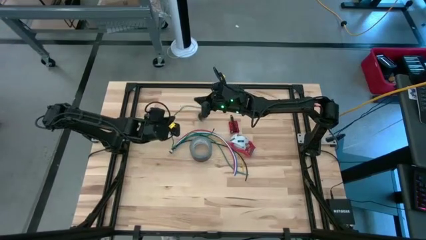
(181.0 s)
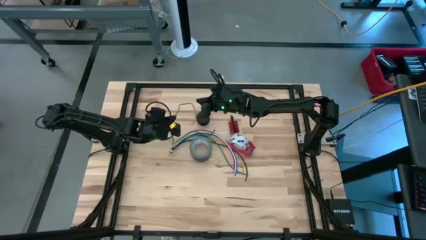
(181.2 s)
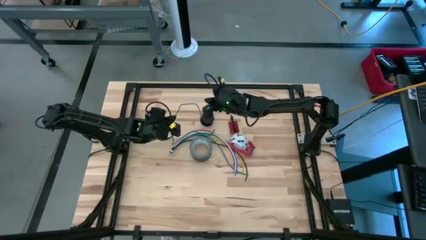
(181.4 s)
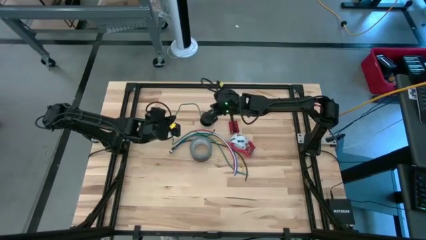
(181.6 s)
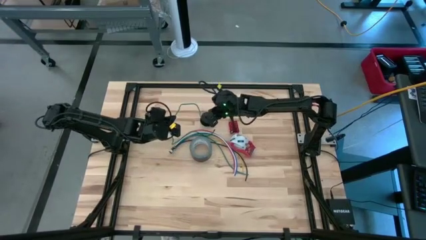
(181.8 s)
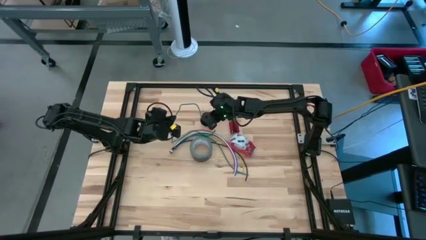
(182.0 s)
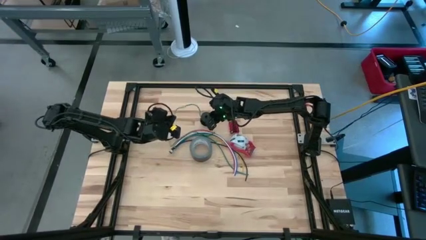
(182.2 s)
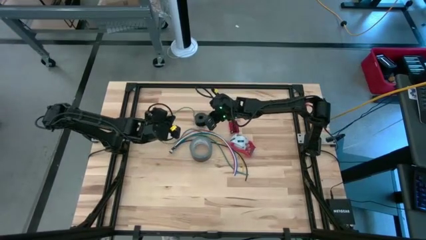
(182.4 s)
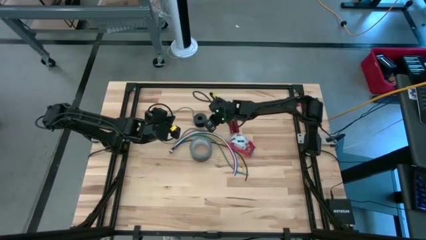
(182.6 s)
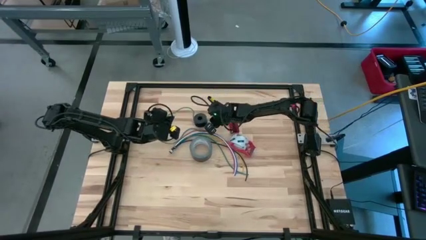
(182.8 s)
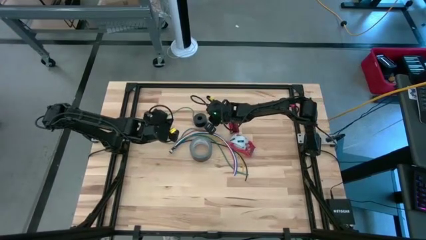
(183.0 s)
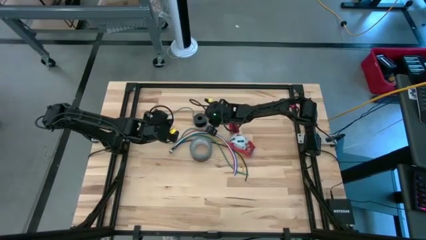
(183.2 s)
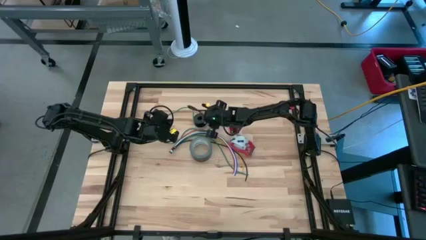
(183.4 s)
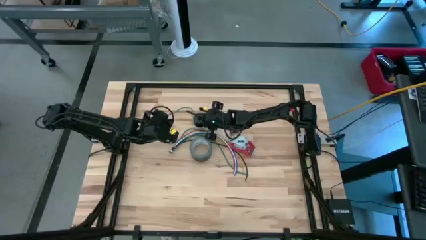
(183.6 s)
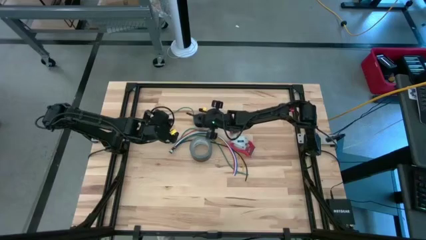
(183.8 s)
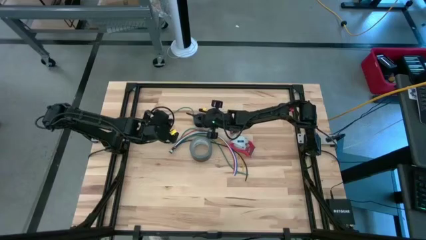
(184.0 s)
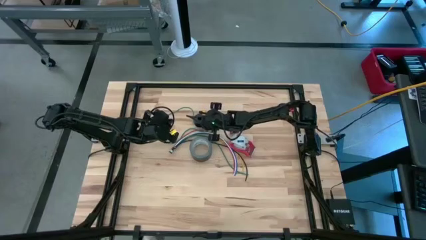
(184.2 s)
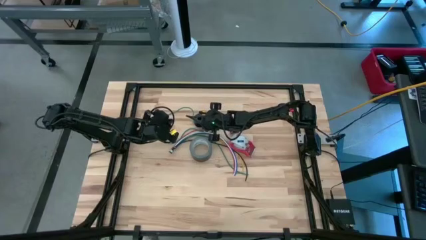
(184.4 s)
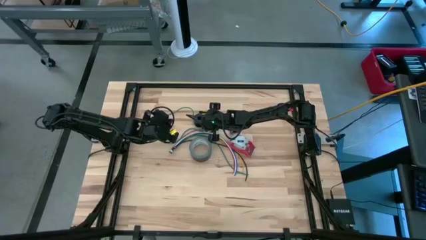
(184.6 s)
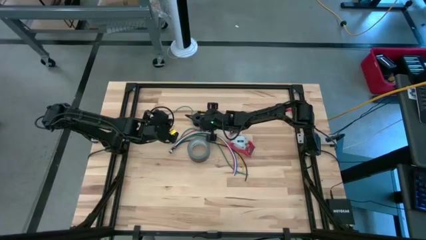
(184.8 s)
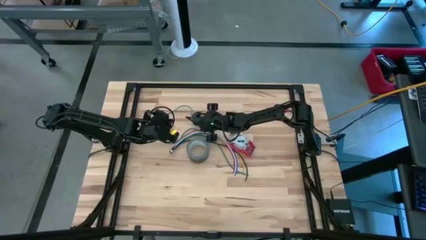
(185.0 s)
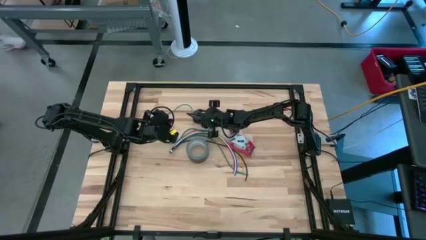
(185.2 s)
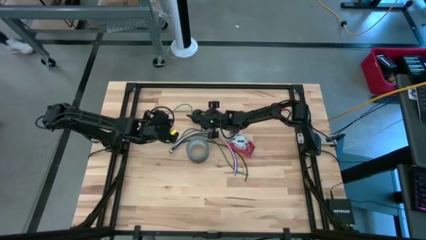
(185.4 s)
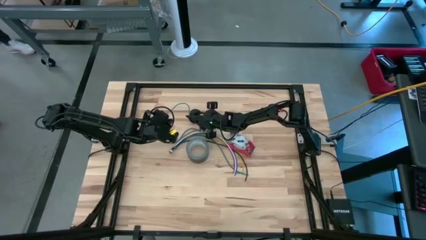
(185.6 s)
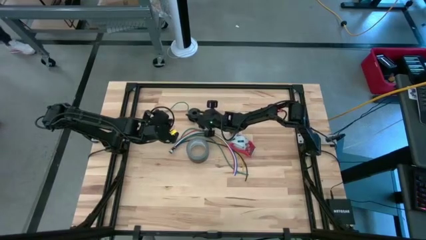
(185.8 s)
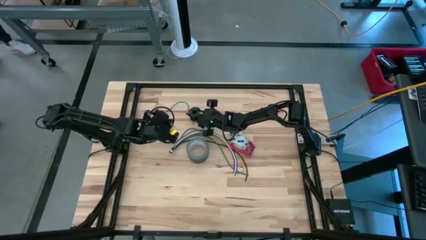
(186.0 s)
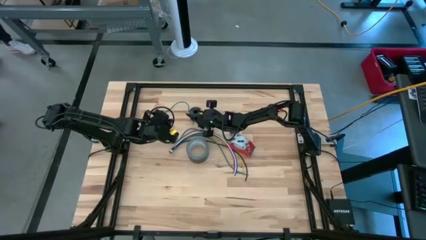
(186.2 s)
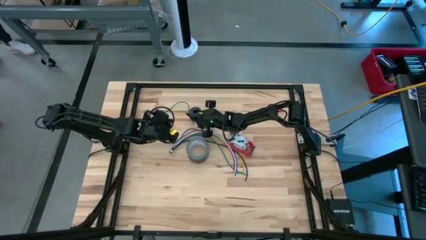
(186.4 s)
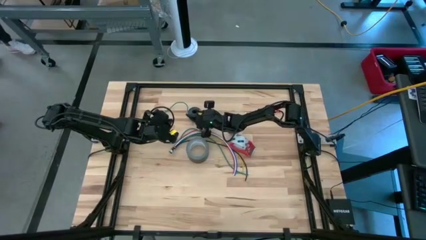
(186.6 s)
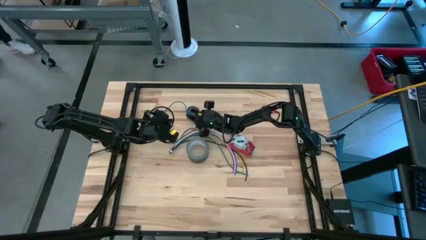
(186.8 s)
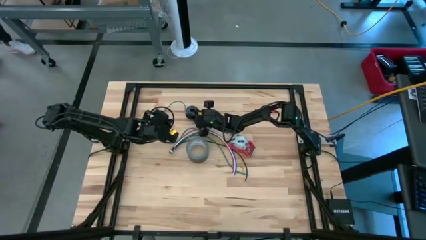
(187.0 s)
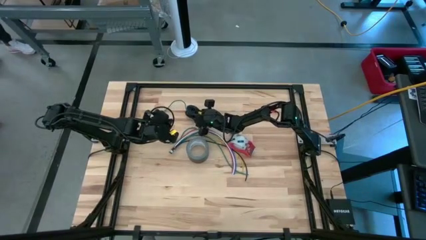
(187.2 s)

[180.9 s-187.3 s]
Task: Coil cords
Coil the green wire onto the black spool

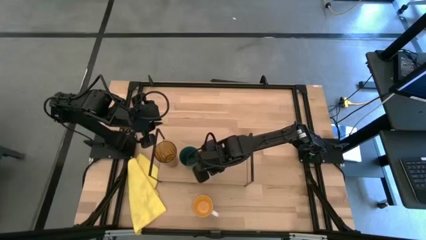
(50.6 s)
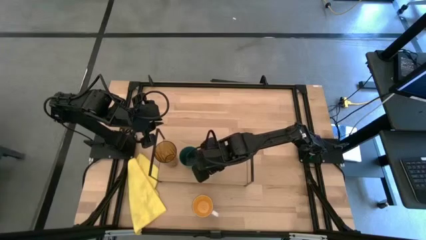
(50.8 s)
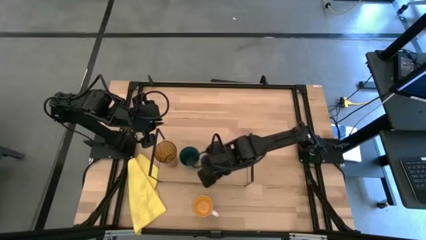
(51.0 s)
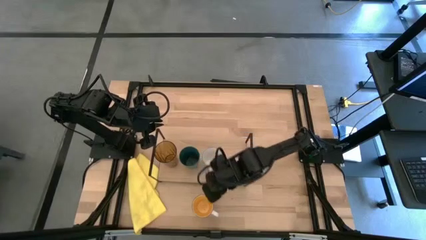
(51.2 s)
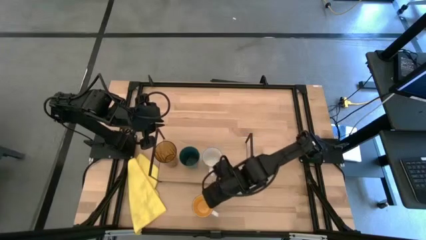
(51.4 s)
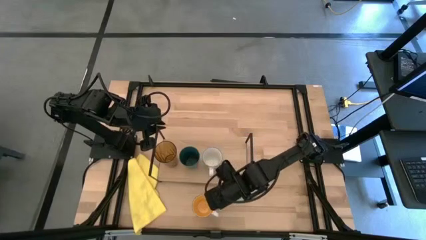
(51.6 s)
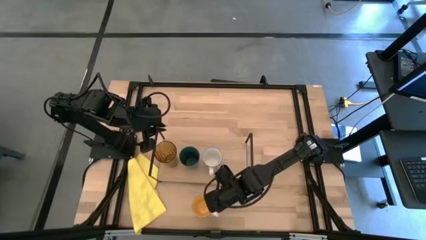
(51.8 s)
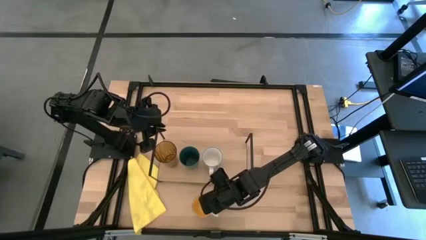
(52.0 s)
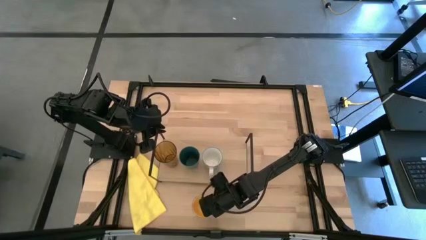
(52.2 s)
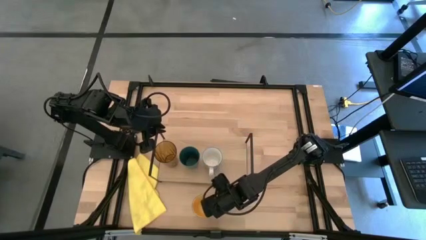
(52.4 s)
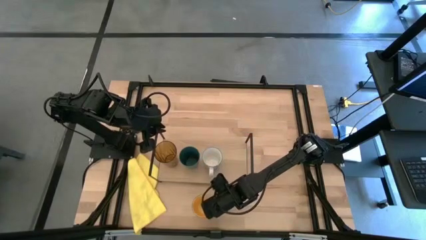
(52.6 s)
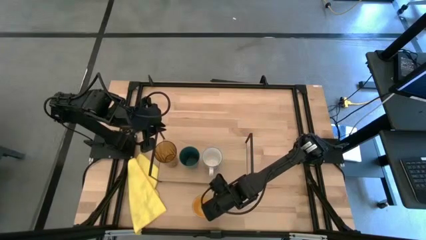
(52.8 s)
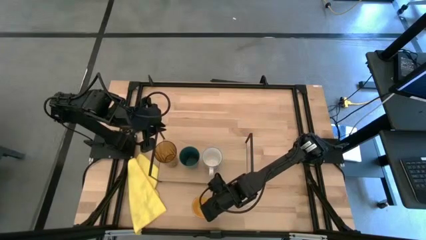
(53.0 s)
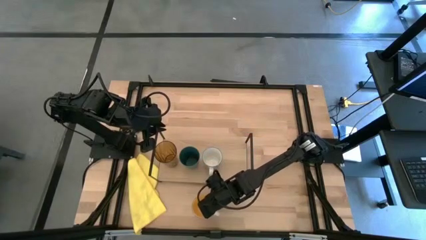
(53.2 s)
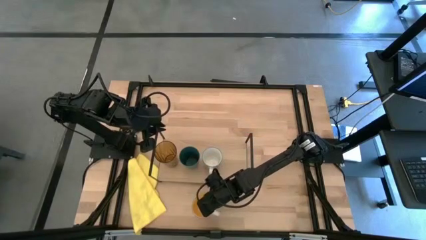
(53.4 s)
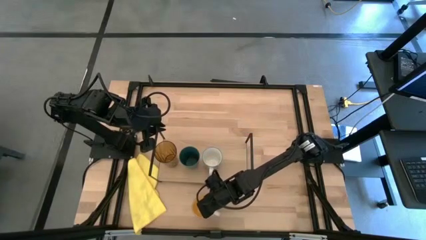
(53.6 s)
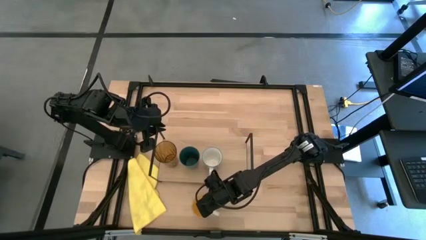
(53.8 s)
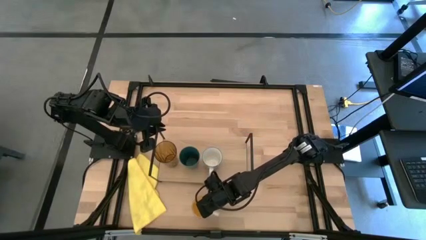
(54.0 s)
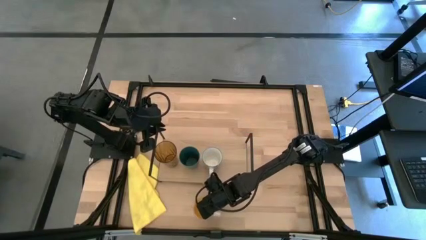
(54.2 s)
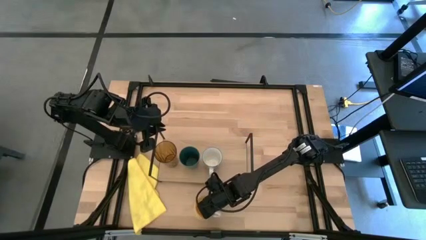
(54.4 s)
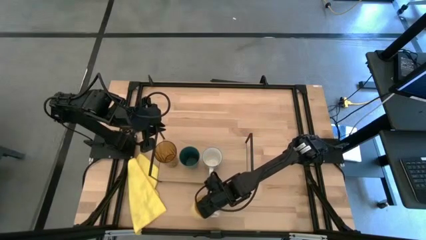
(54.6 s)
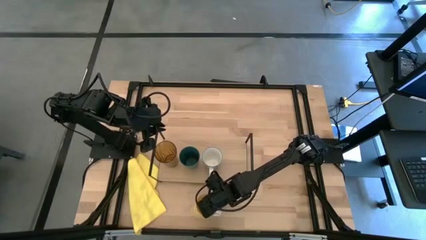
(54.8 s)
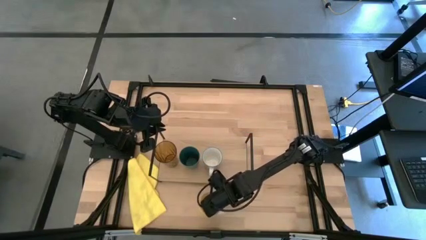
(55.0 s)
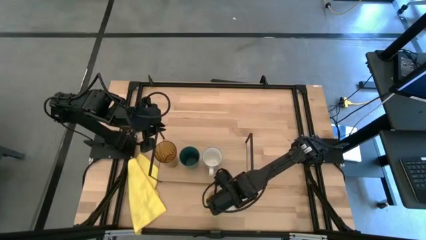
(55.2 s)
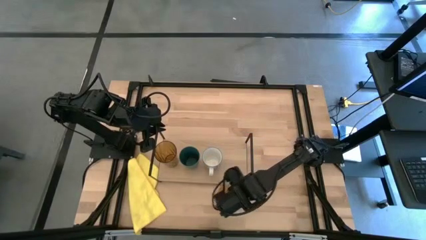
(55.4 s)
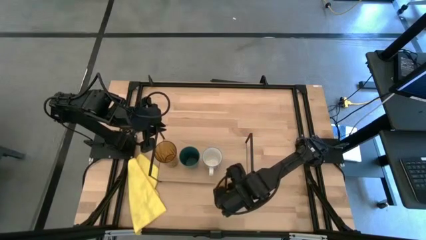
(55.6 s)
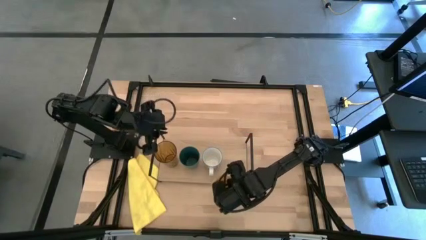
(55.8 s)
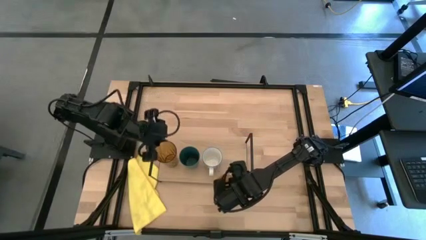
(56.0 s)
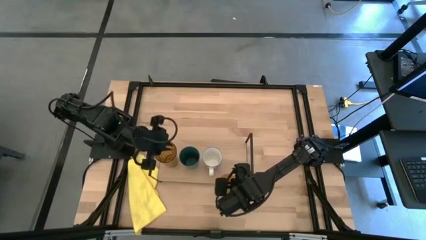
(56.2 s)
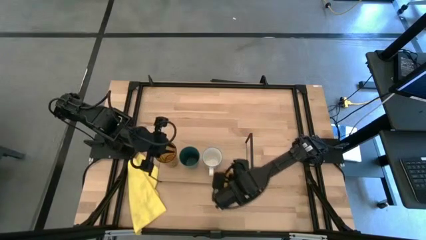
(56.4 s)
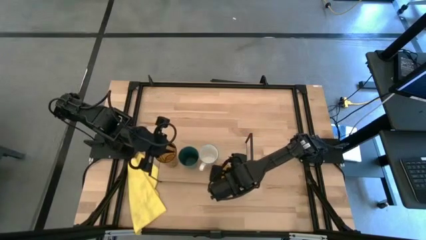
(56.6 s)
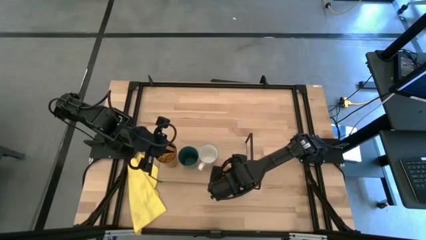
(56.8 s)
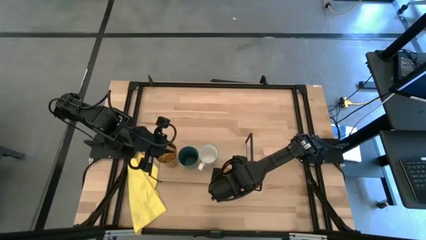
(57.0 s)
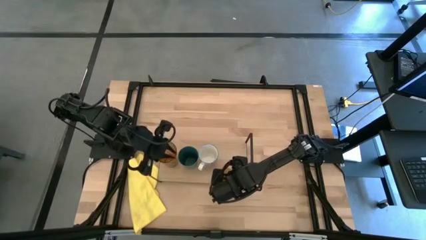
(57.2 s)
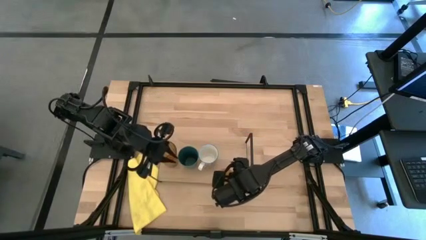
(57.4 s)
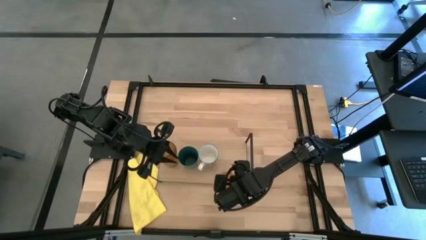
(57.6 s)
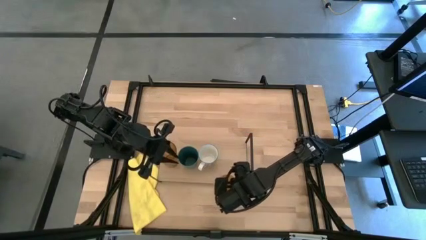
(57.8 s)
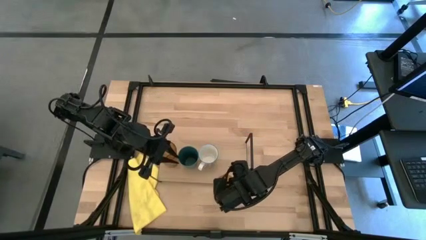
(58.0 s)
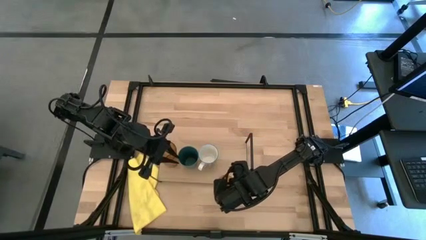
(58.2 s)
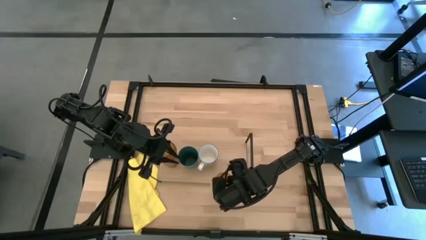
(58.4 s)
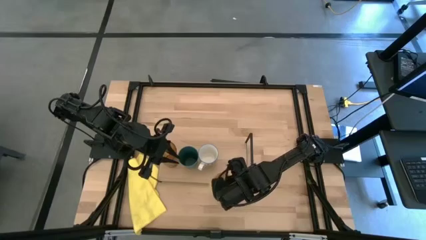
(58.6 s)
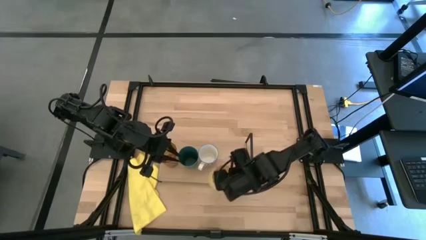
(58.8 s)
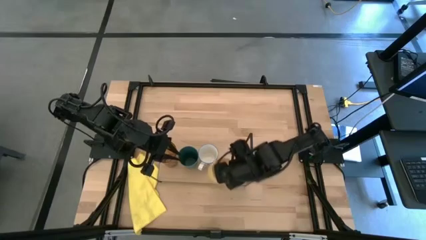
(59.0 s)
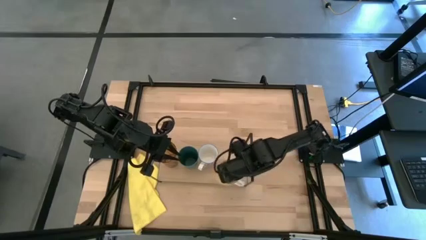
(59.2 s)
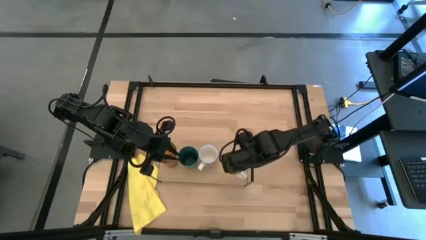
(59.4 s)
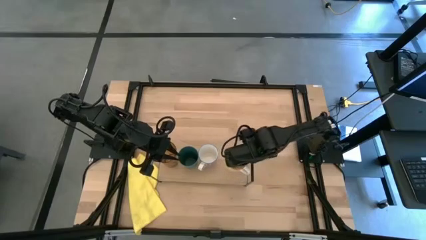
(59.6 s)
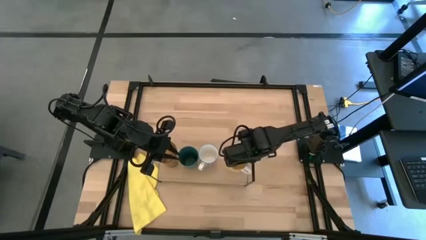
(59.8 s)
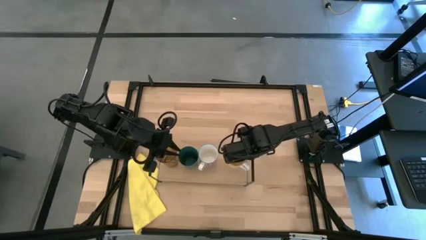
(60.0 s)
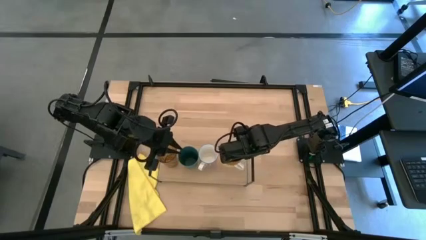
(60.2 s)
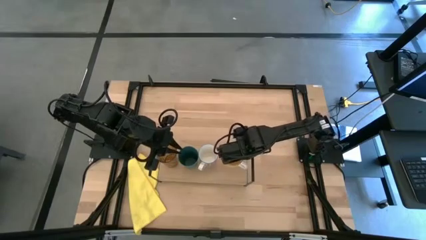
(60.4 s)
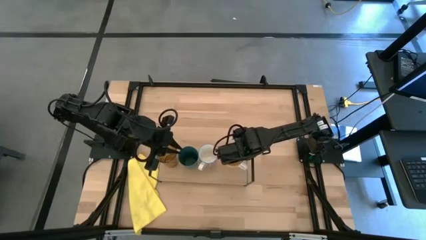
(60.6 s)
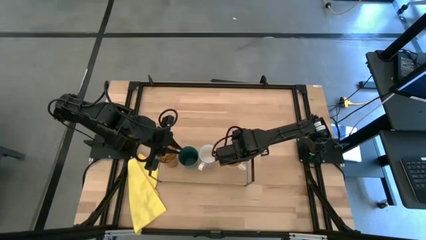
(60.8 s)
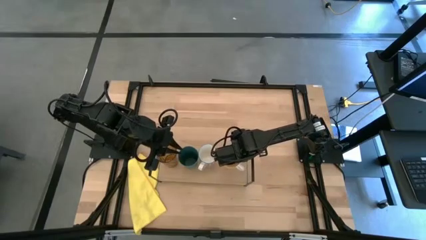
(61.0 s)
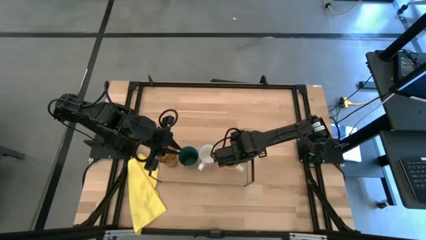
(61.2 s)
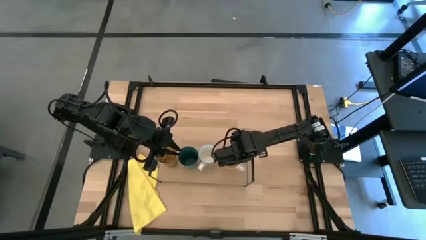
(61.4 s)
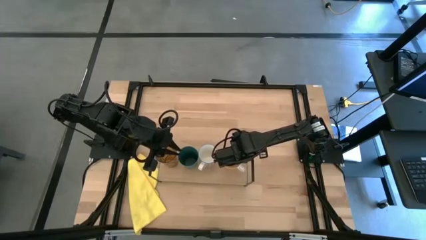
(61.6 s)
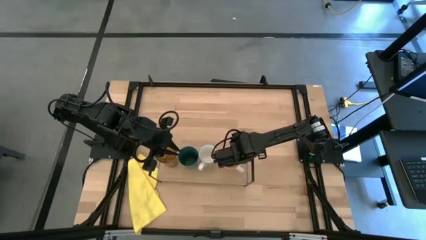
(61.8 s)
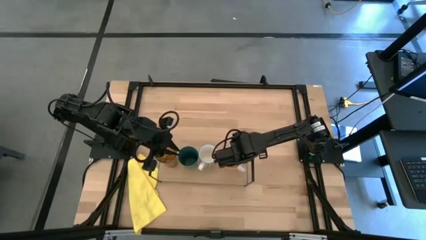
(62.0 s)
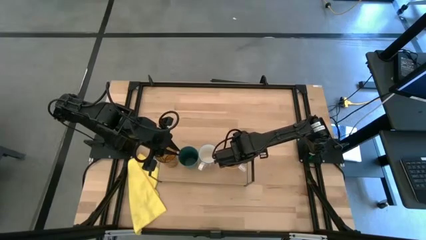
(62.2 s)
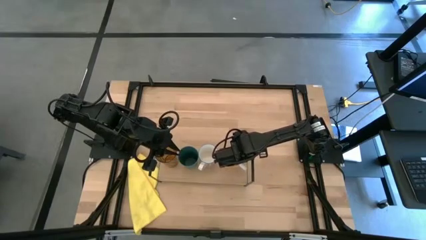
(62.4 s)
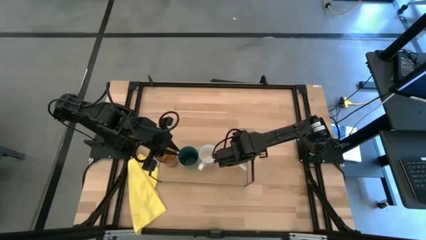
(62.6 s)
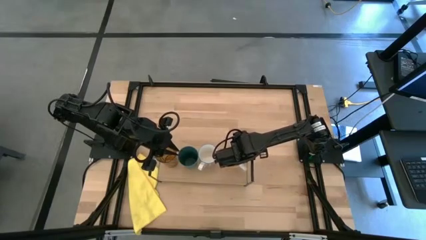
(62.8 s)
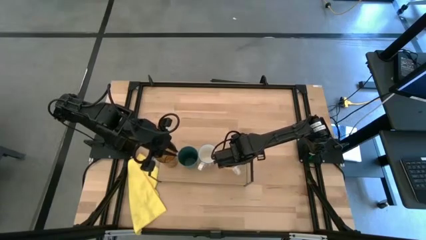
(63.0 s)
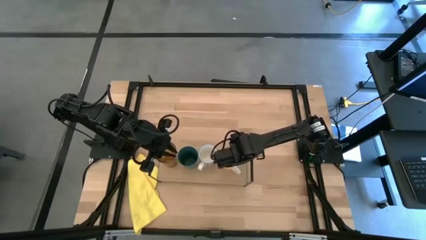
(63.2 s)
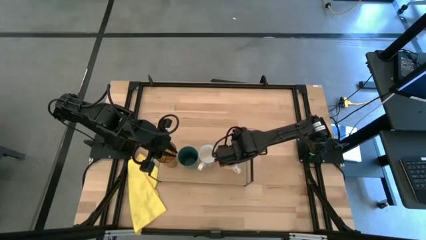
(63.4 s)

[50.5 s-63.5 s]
Task: Stack small to large cups/mugs on shelf
Put the yellow mug on the shelf
